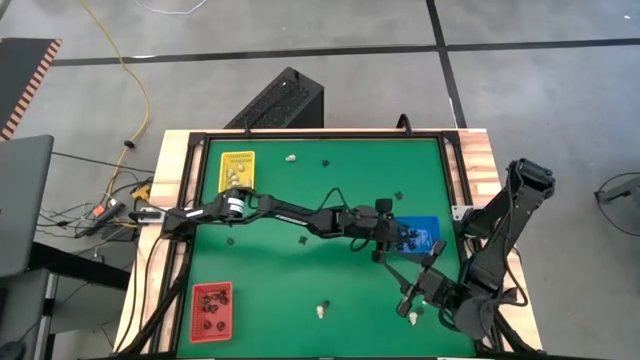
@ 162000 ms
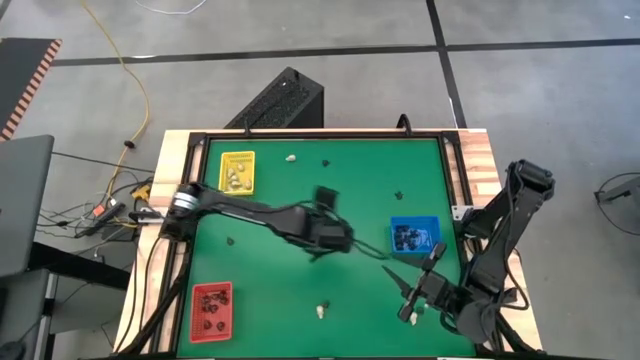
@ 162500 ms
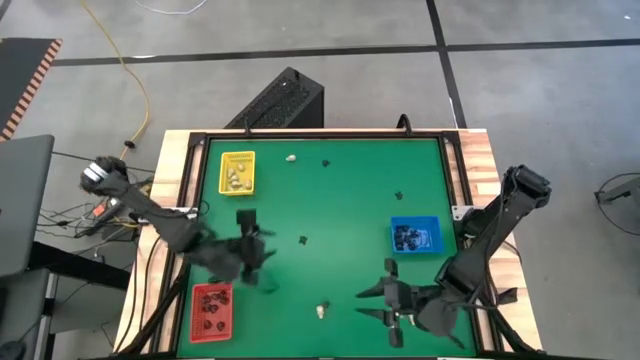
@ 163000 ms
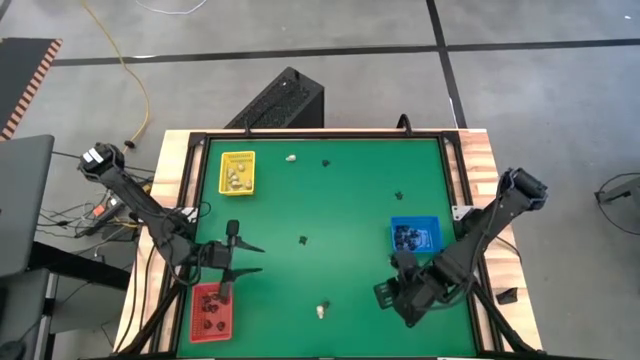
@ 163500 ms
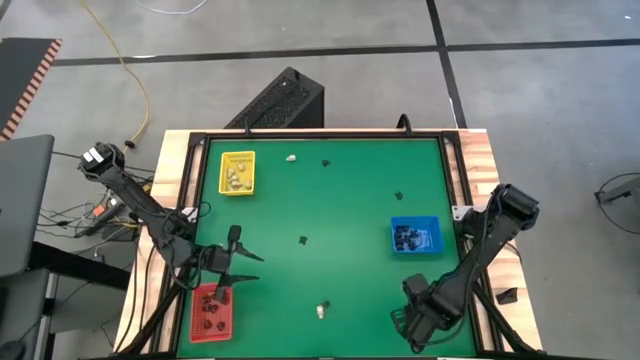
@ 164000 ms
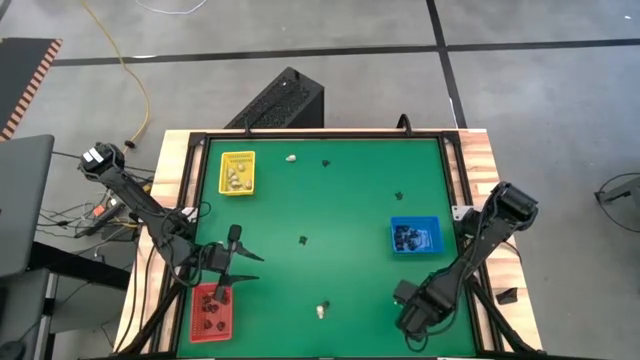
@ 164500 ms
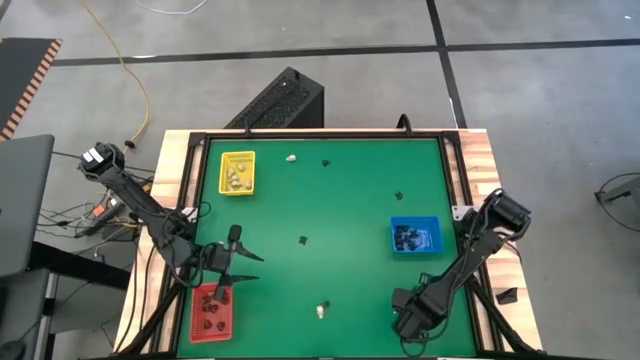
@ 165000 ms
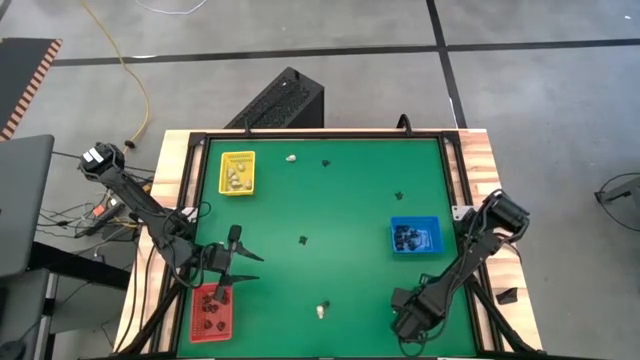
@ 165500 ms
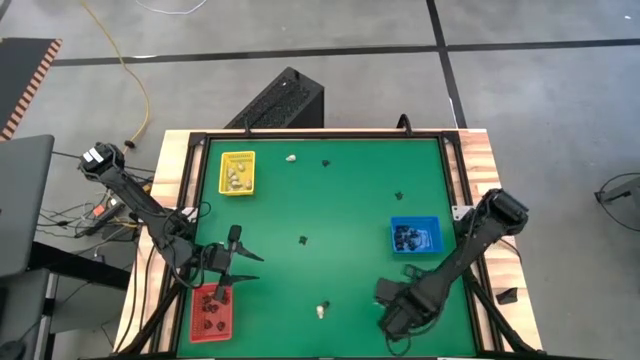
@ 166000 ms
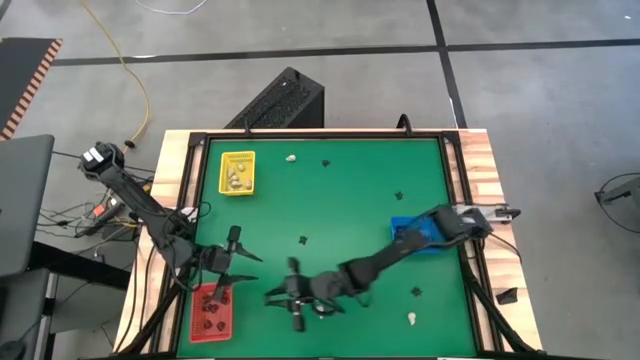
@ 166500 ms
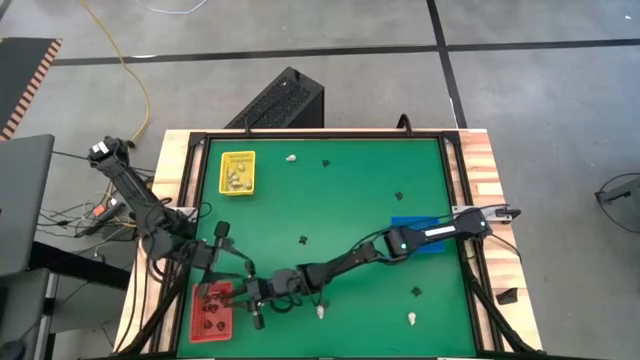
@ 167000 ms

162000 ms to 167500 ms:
Task: Sort Halloween decoration
Put the black skull toy into the red bin

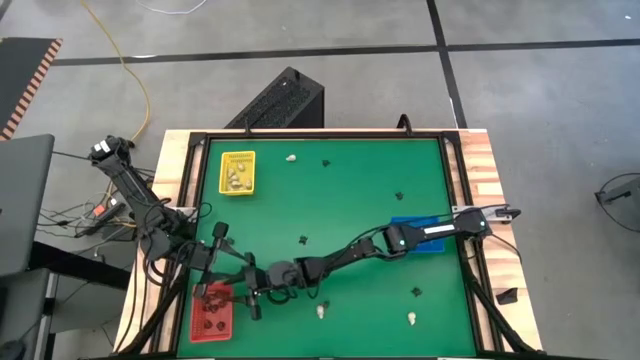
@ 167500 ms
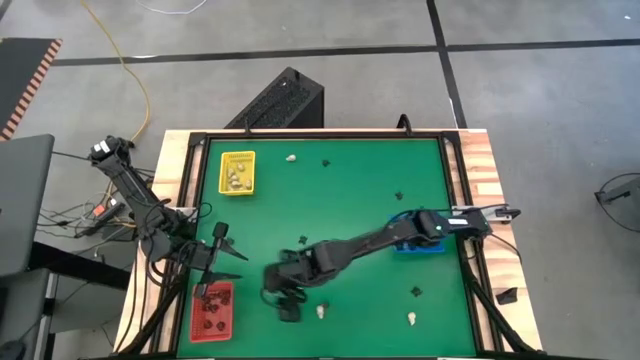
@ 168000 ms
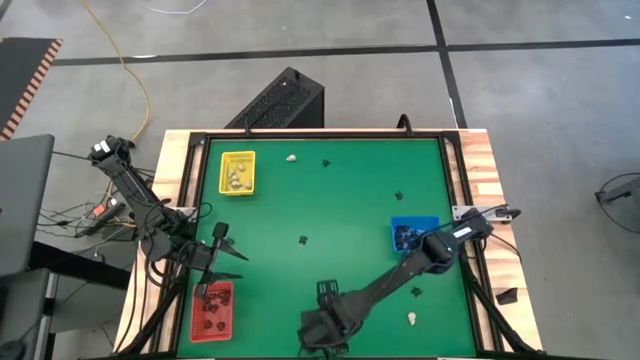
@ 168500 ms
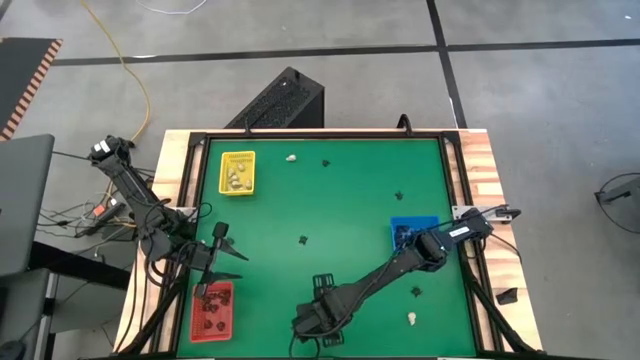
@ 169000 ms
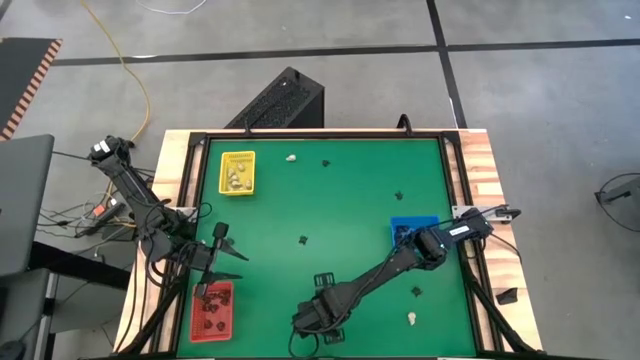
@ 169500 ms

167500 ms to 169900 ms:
Put the black skull toy into the red bin

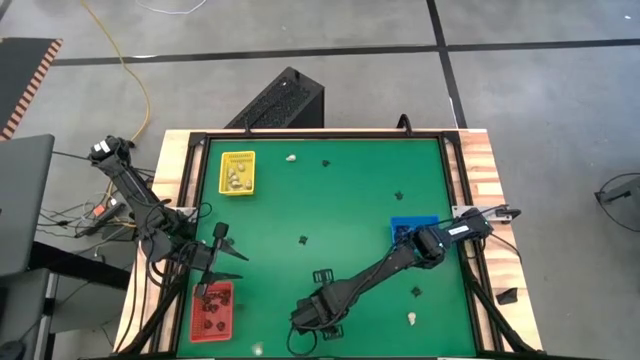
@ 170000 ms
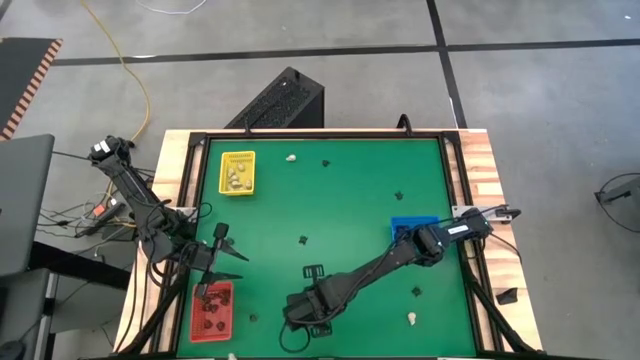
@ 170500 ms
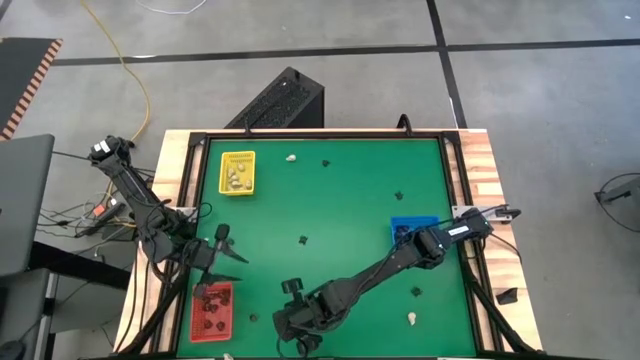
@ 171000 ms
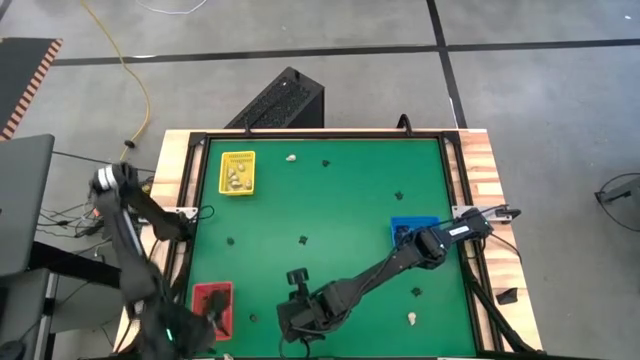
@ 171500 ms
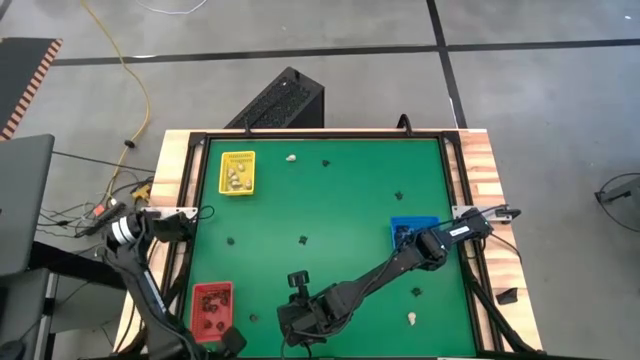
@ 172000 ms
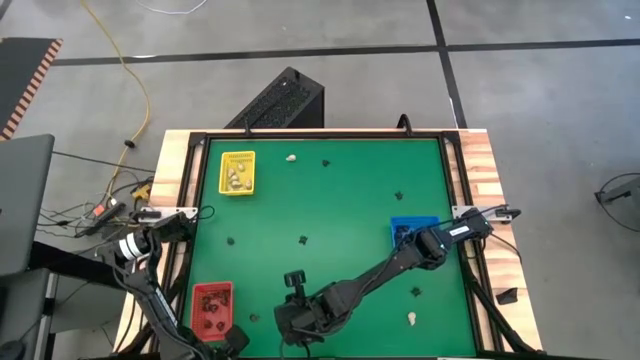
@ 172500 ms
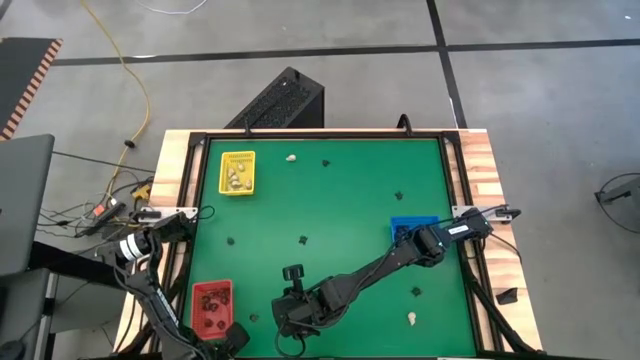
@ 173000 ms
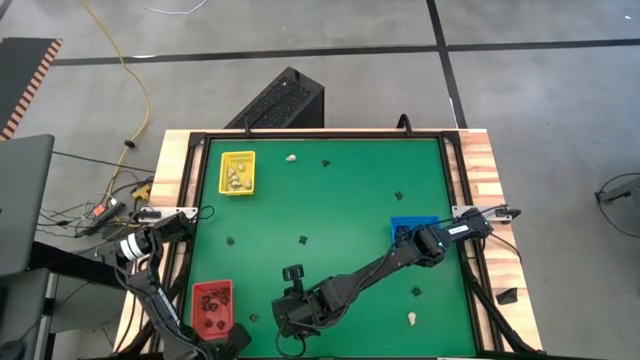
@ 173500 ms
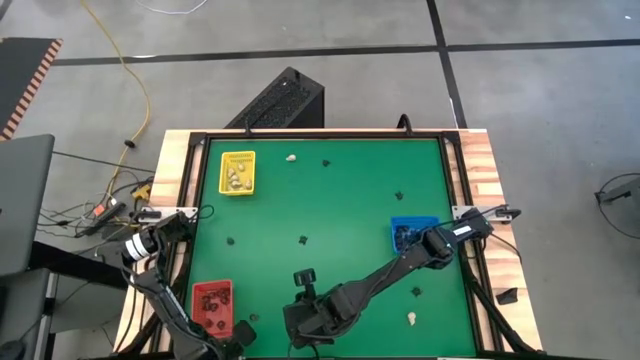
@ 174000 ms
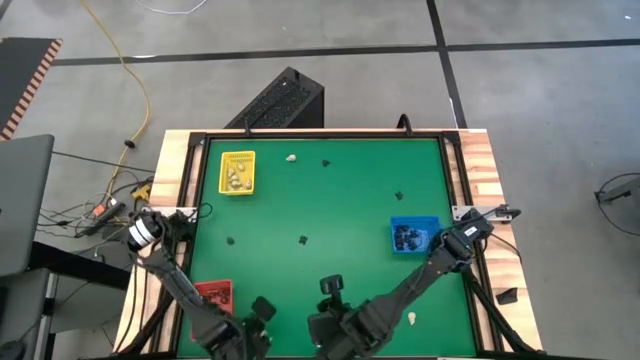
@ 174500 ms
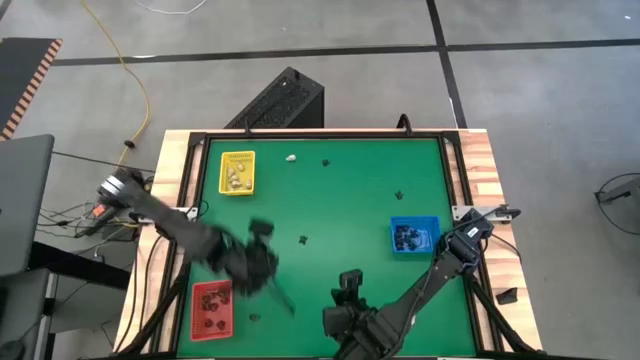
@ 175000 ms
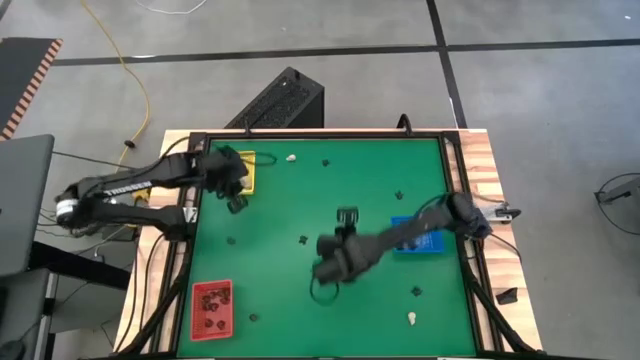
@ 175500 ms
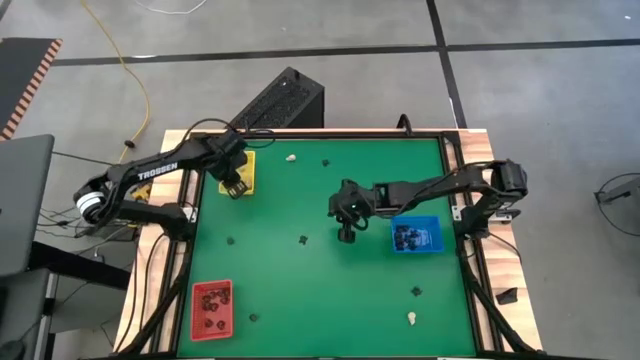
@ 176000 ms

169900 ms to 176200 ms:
Put the white skull toy into the yellow bin

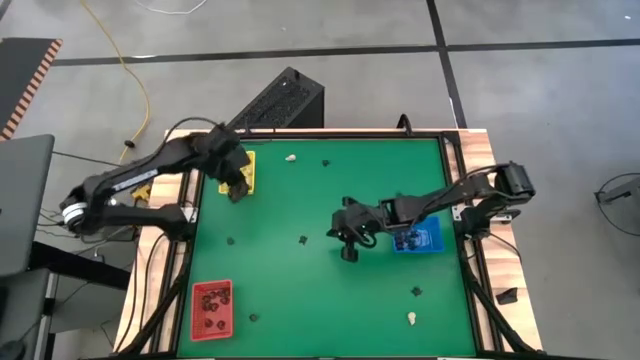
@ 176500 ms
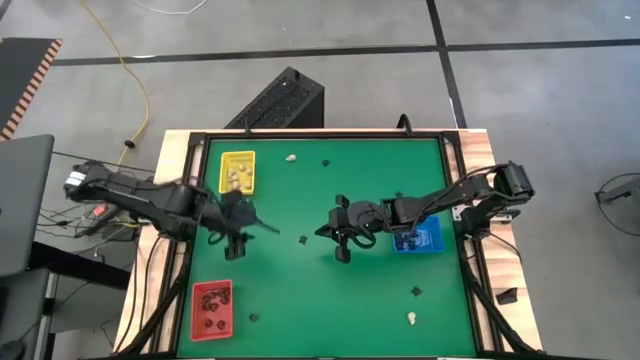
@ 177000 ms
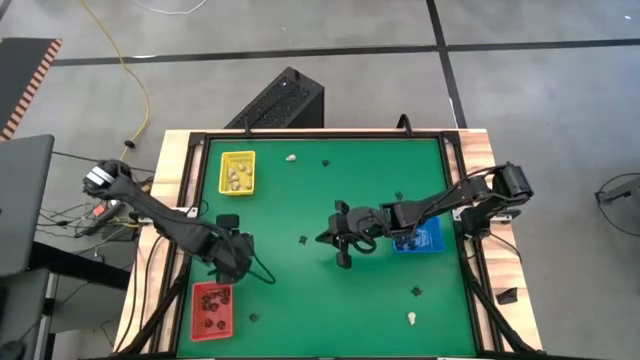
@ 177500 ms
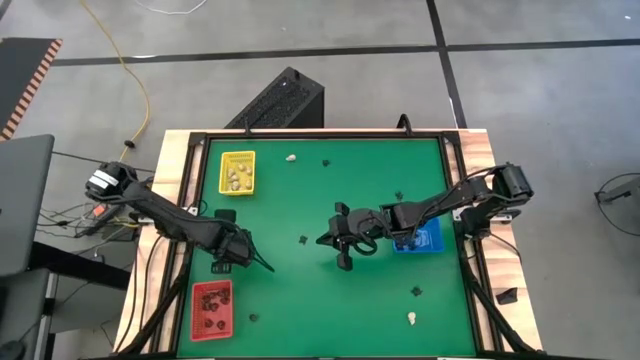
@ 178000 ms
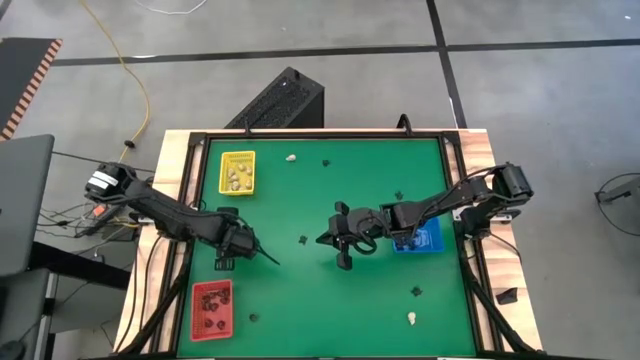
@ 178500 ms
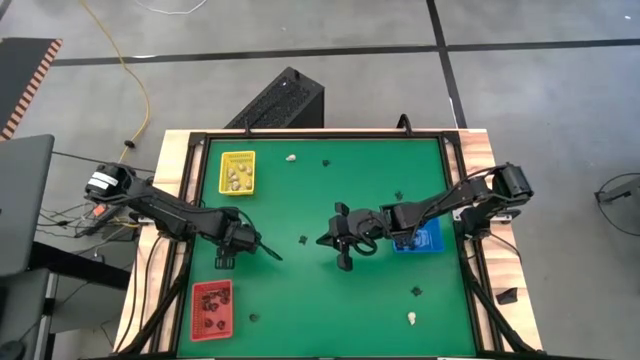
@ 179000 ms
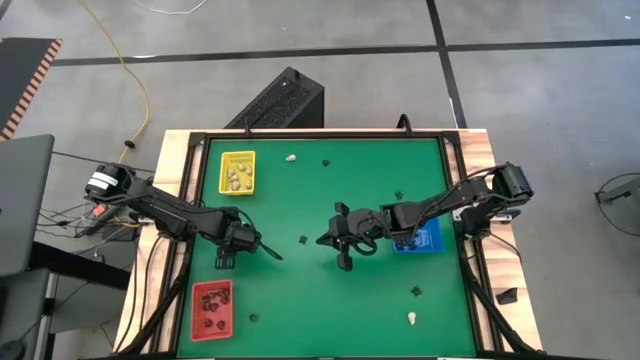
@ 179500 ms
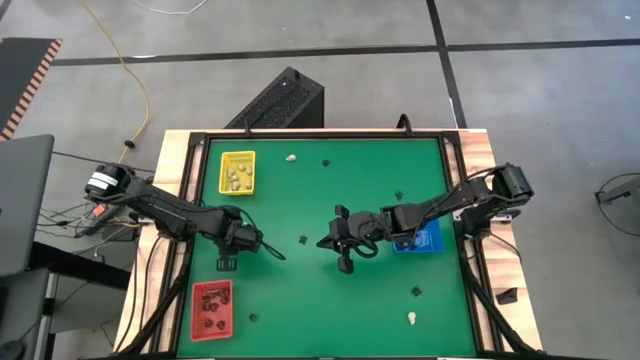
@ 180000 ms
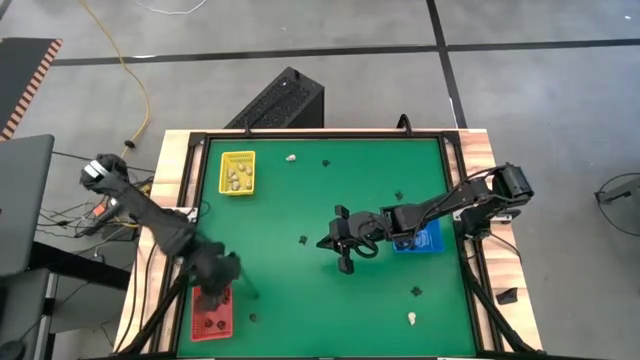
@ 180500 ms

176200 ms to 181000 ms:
Put the black skull toy into the red bin

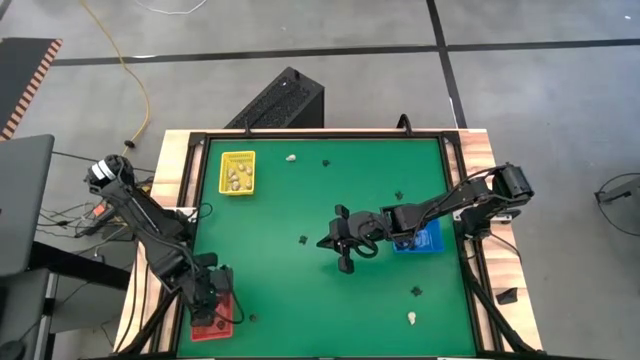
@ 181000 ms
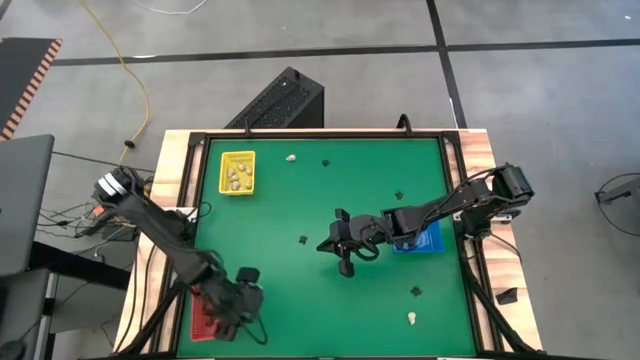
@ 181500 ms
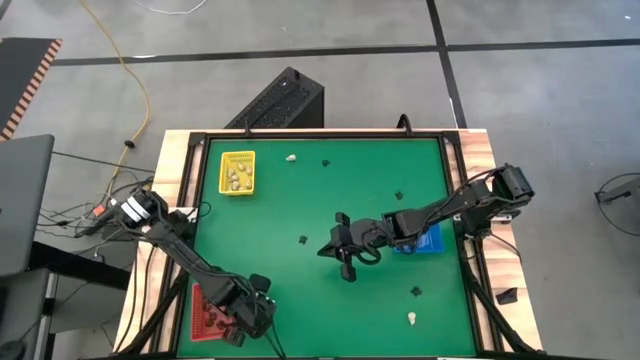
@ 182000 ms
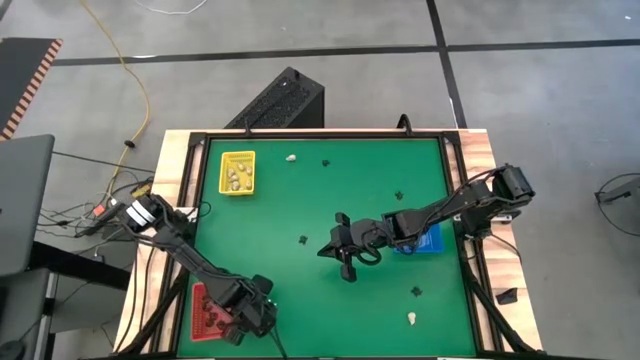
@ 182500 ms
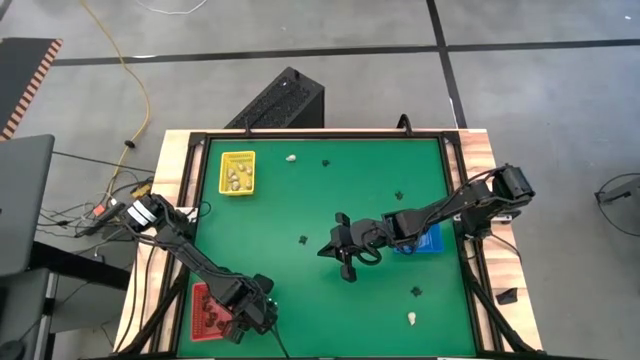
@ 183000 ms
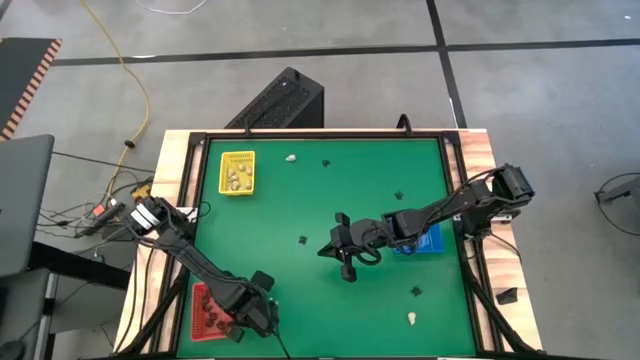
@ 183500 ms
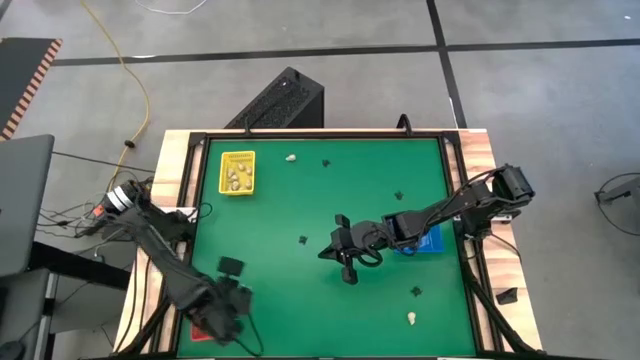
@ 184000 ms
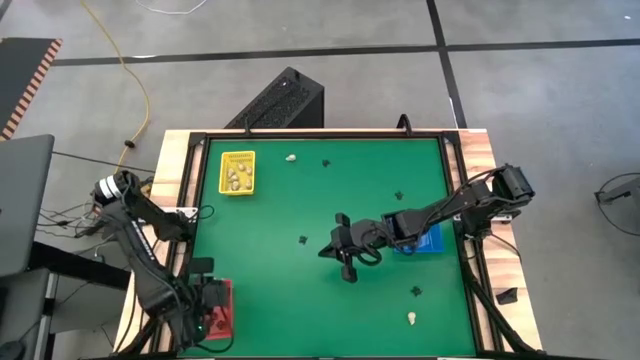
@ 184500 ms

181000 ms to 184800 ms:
Put the black skull toy into the red bin
